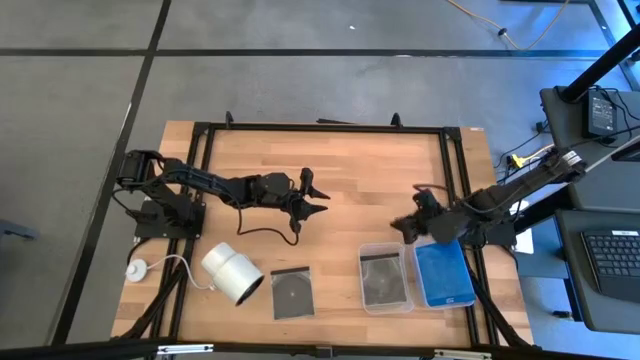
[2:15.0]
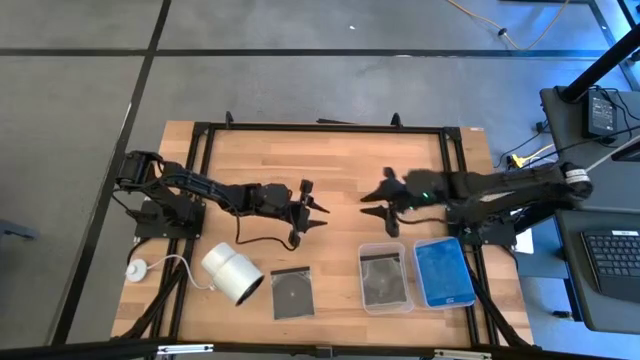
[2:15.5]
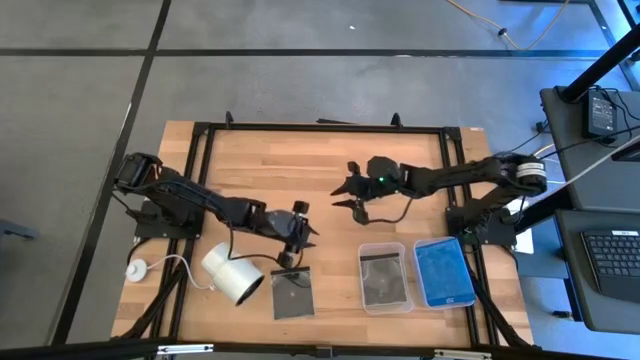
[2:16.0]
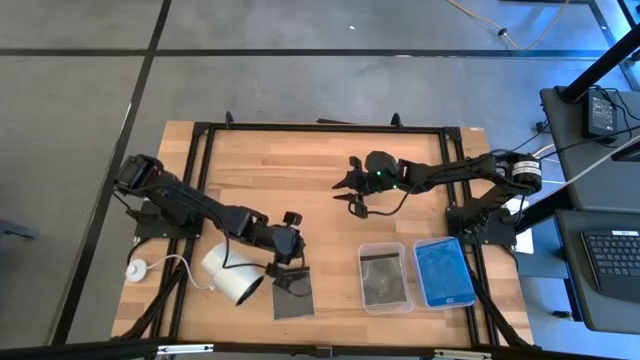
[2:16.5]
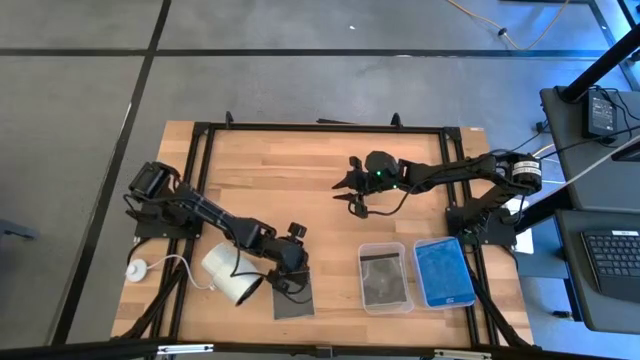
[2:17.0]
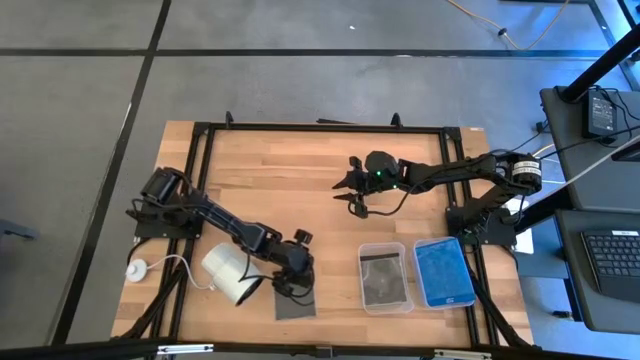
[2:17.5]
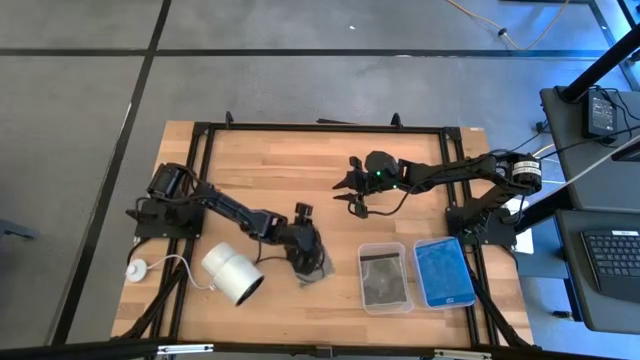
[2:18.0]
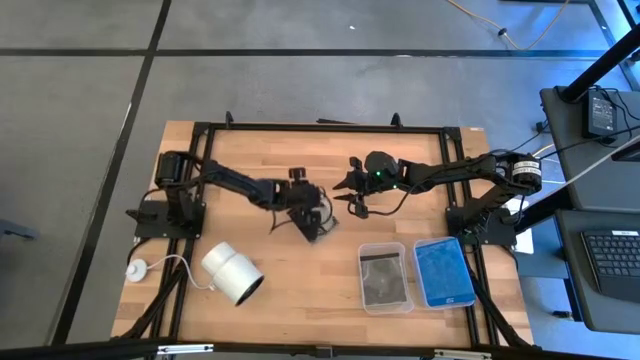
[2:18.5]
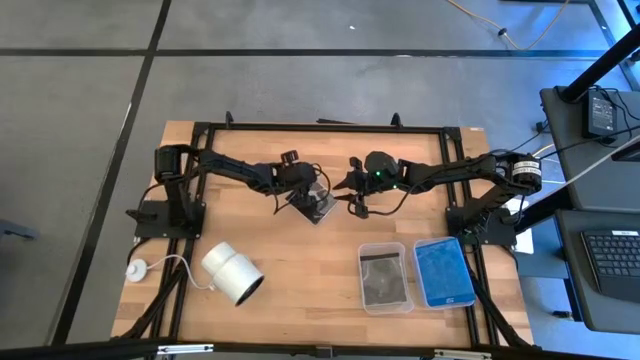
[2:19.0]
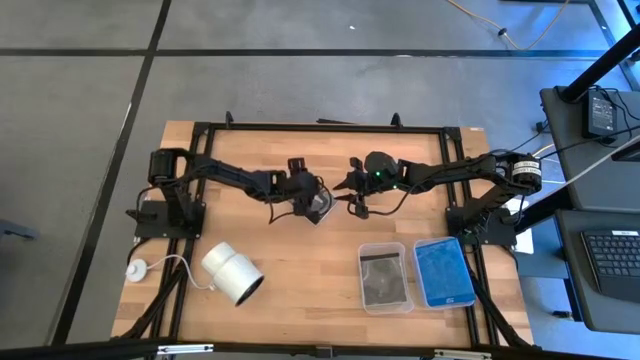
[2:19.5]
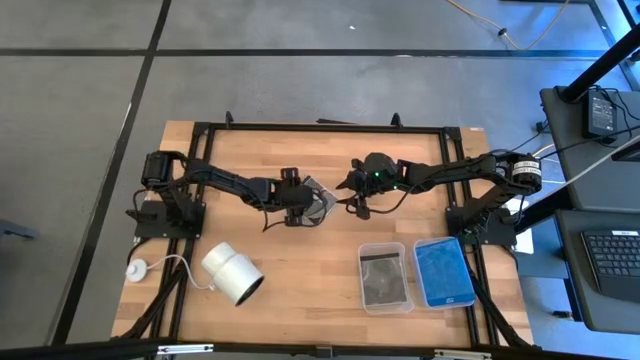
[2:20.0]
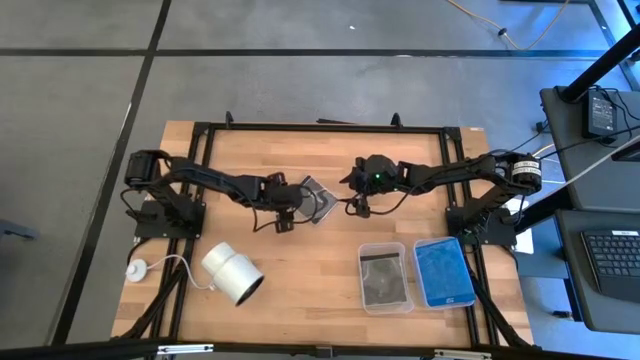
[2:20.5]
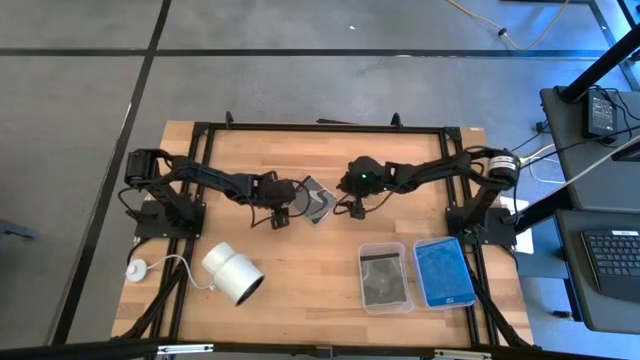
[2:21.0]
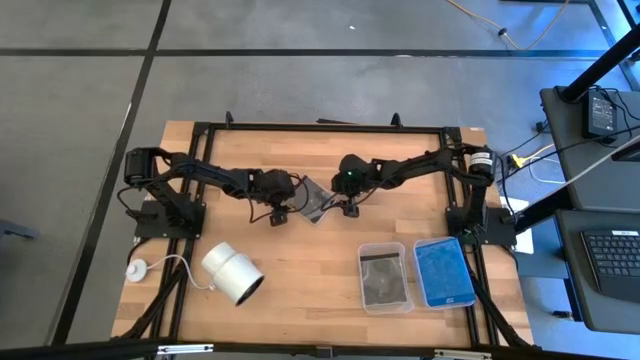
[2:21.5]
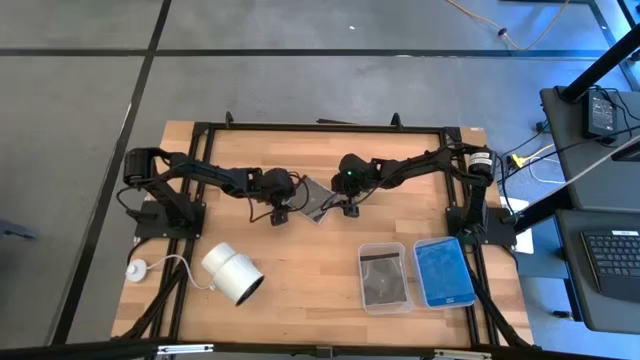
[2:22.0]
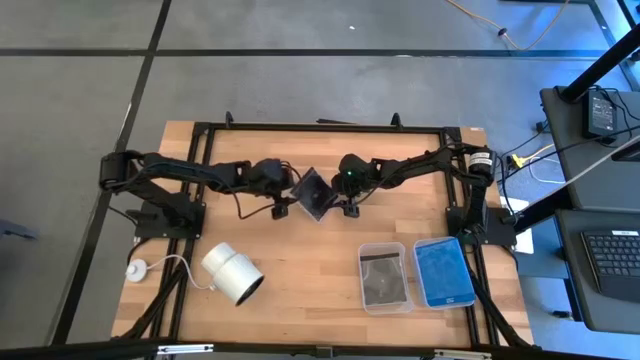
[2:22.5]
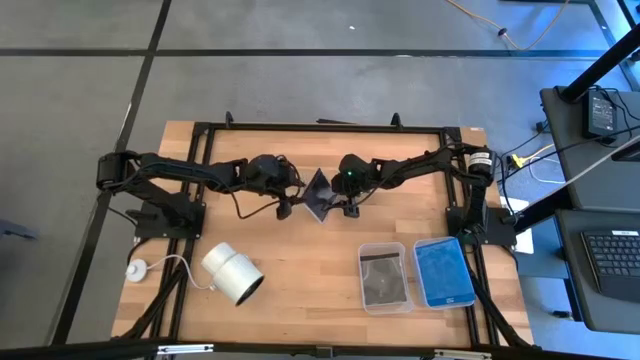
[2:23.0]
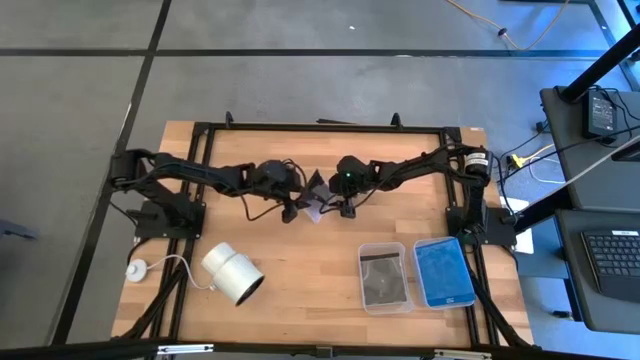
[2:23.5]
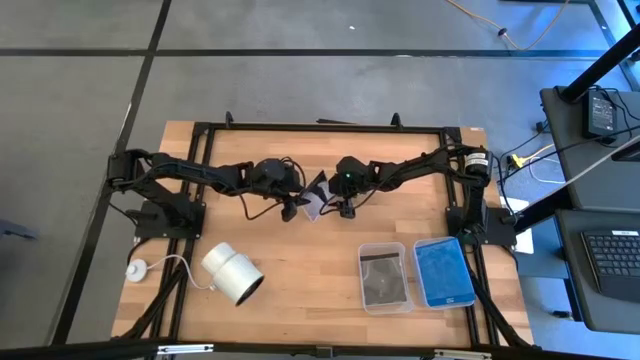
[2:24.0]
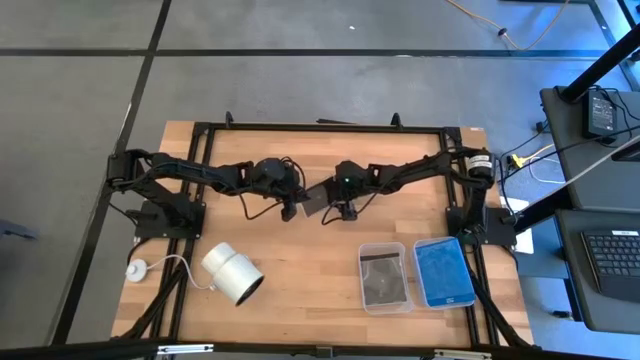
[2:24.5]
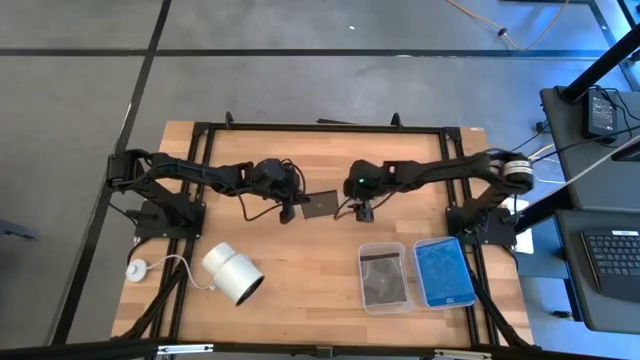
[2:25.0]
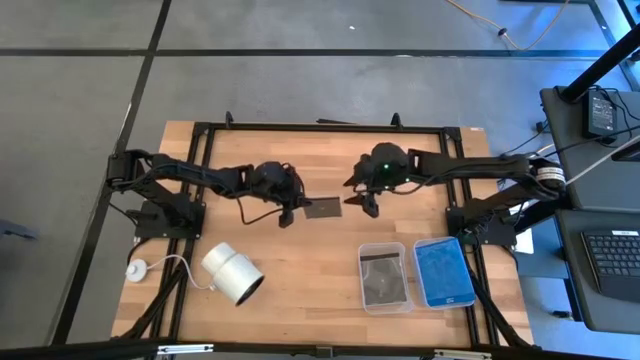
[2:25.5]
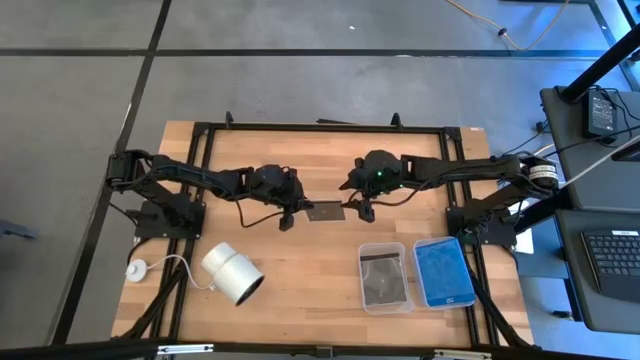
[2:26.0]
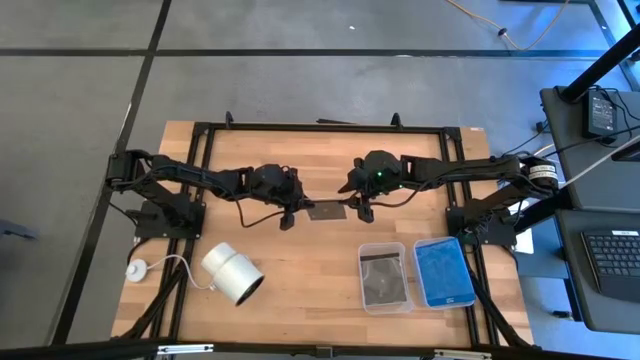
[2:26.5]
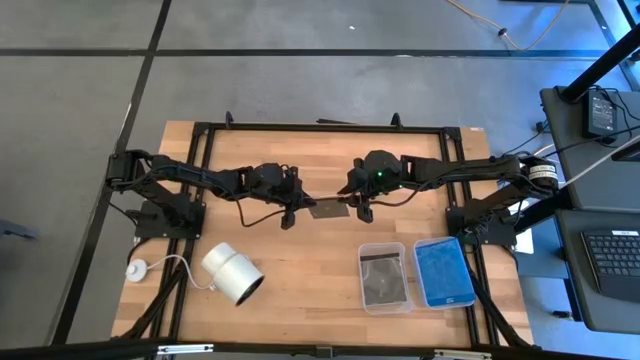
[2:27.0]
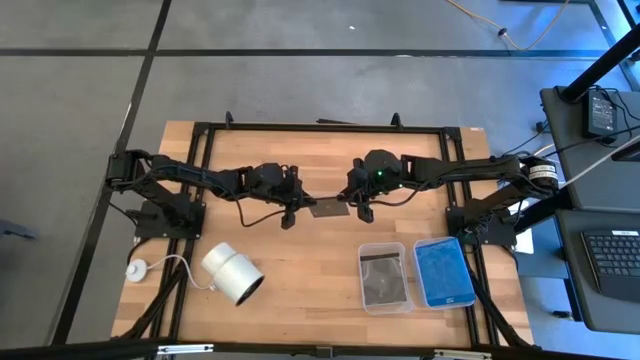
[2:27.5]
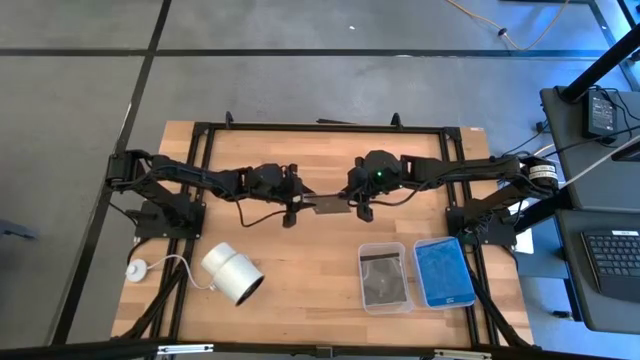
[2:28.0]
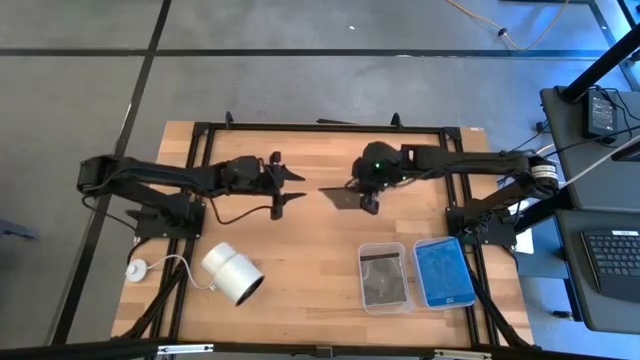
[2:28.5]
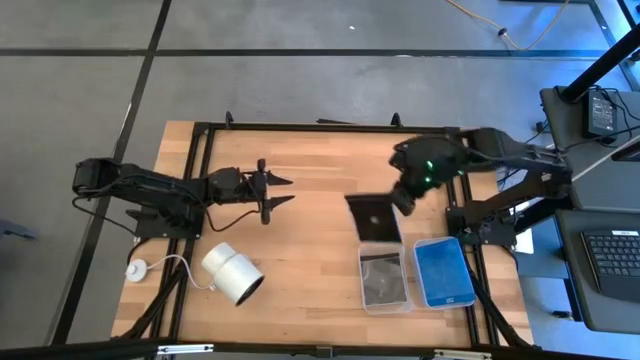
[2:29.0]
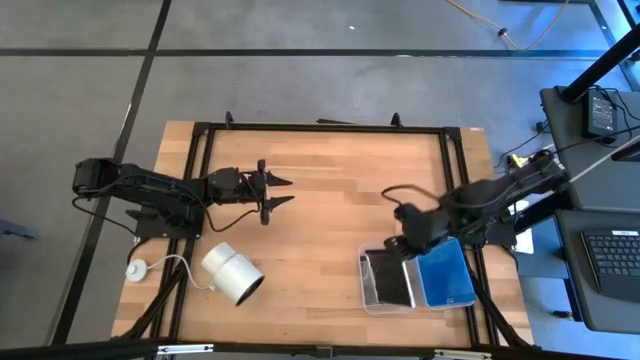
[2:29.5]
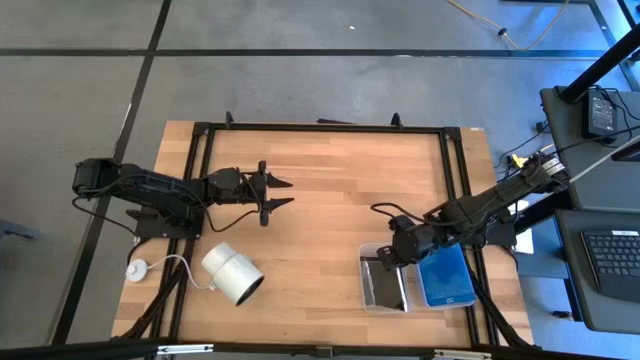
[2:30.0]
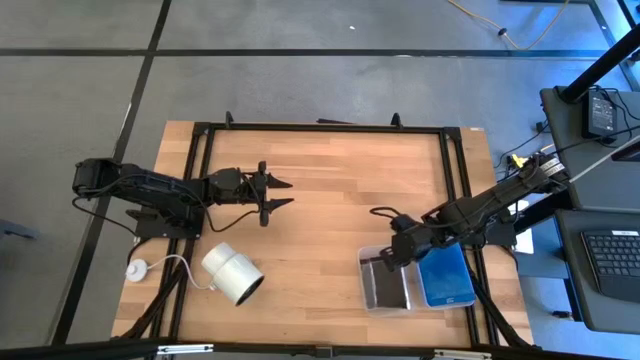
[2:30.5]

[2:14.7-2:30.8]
Task: Pick & place jewel cases by type
Put the black CD case into the left transparent bin

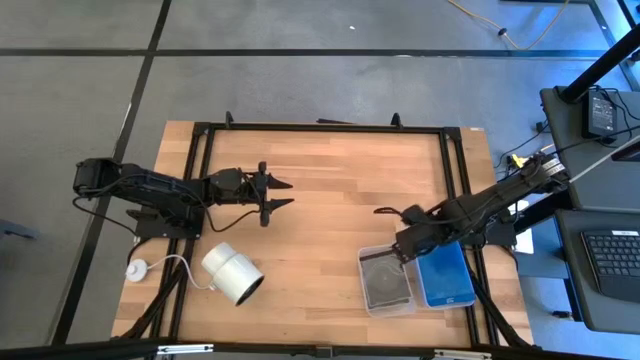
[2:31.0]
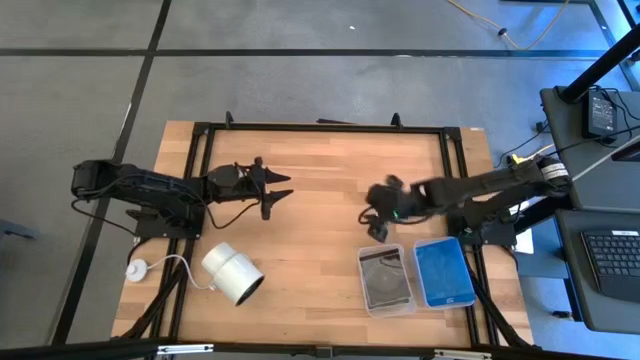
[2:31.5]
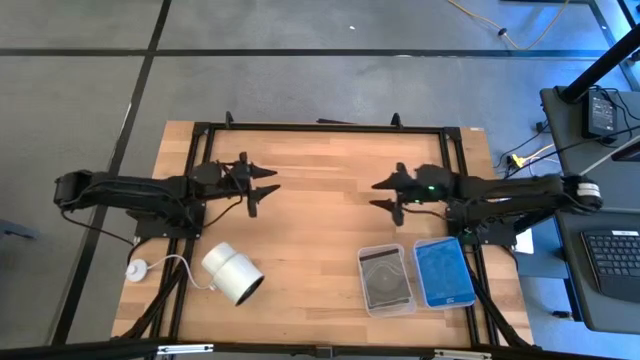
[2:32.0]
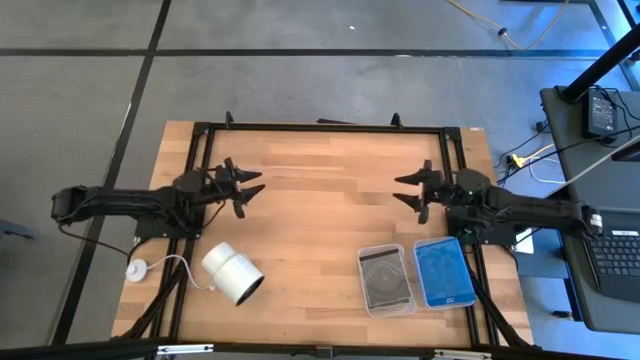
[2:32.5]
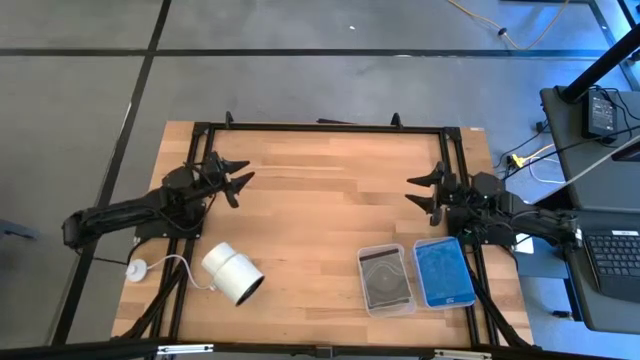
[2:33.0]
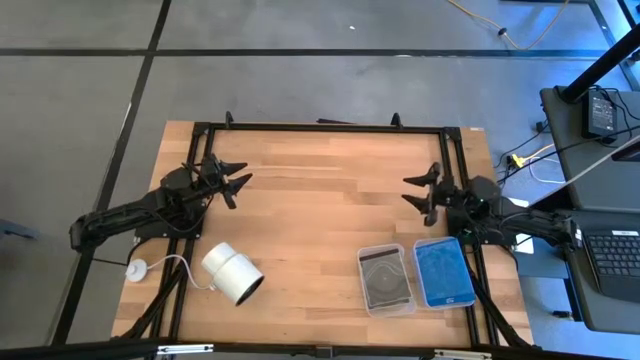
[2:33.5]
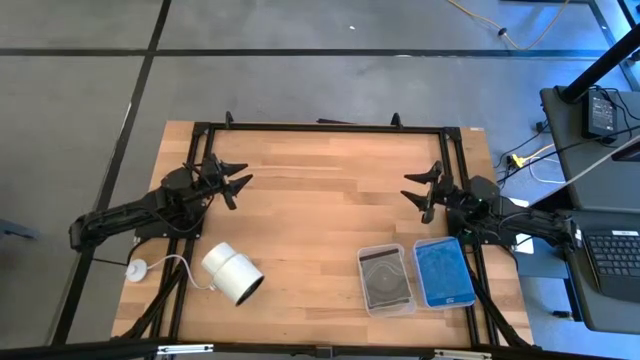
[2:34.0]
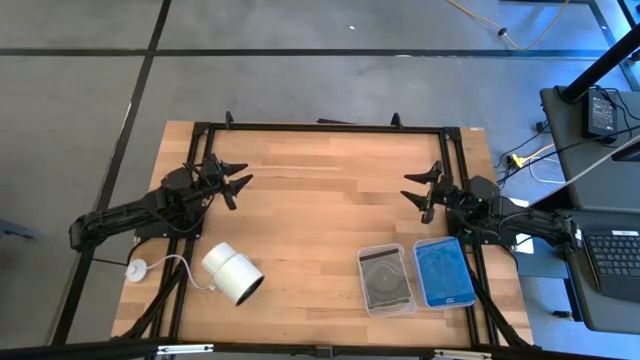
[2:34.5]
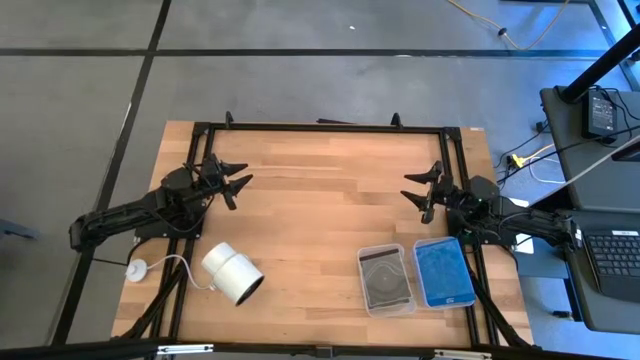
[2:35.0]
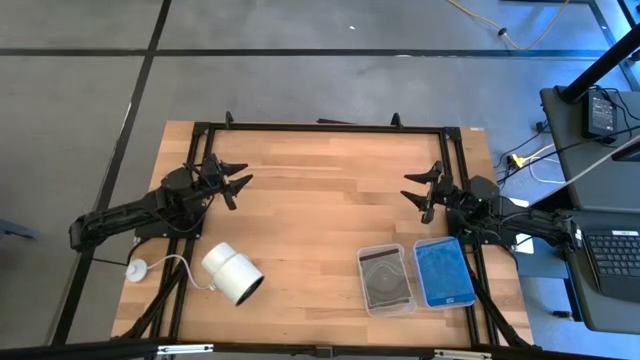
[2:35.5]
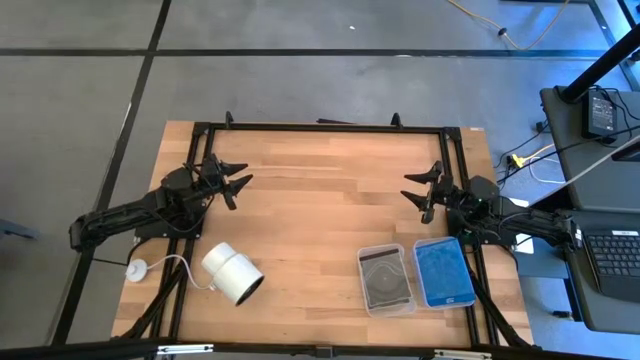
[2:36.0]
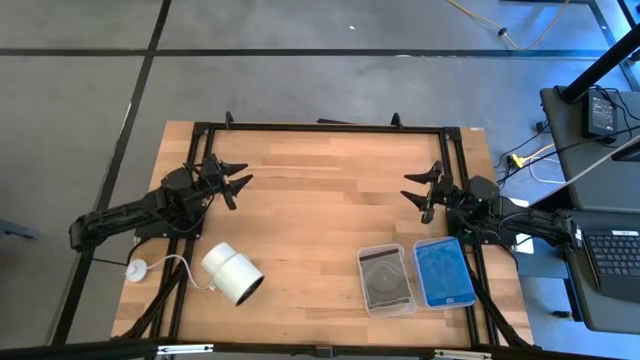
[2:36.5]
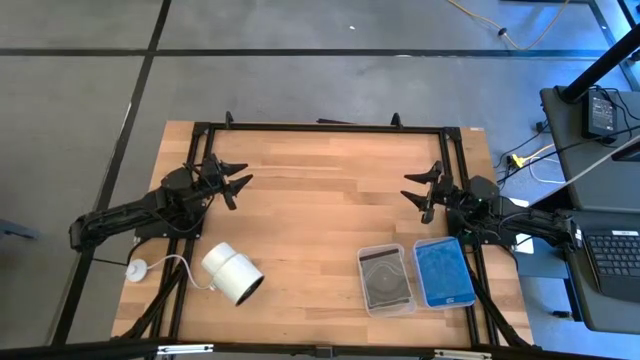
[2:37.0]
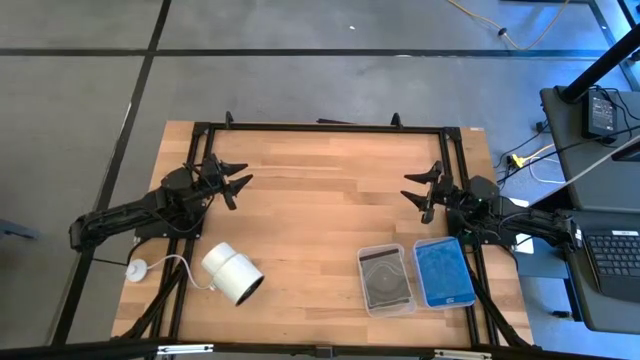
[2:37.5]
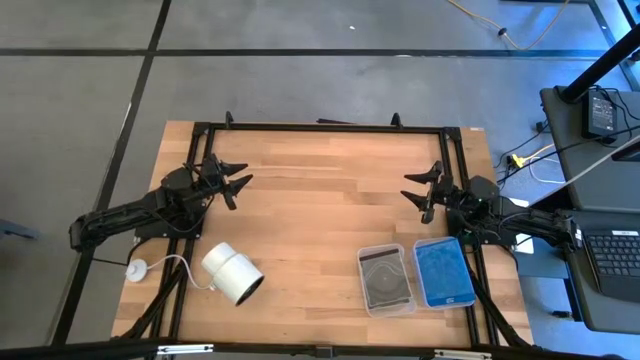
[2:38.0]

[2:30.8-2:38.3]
Return to Home Position
